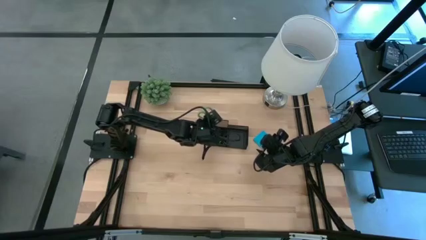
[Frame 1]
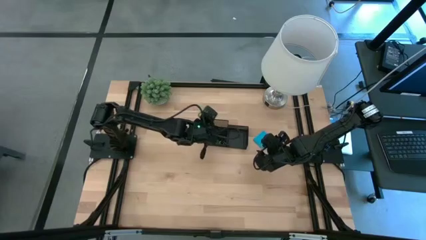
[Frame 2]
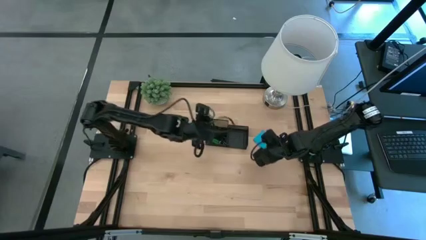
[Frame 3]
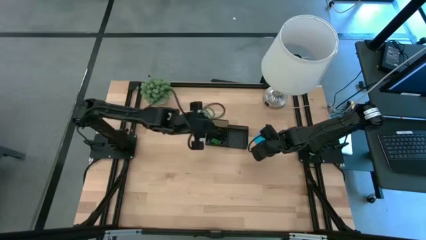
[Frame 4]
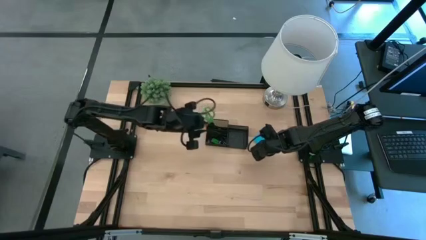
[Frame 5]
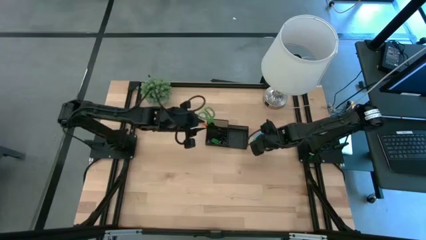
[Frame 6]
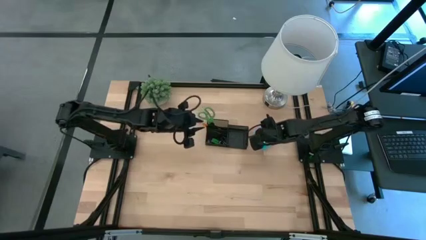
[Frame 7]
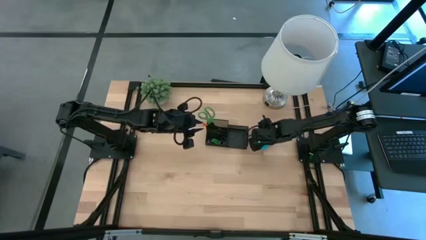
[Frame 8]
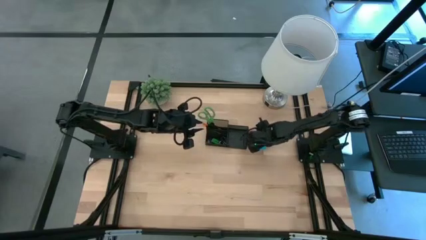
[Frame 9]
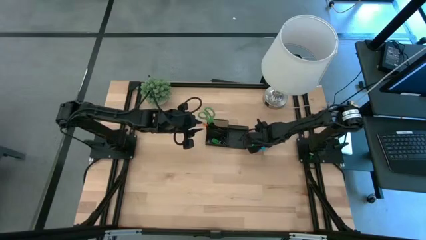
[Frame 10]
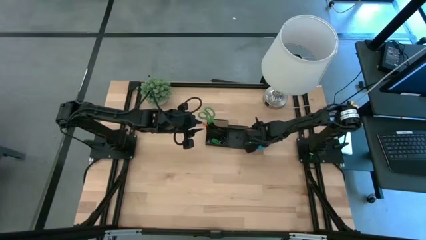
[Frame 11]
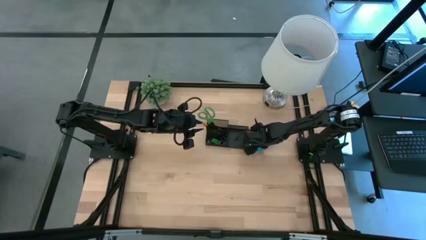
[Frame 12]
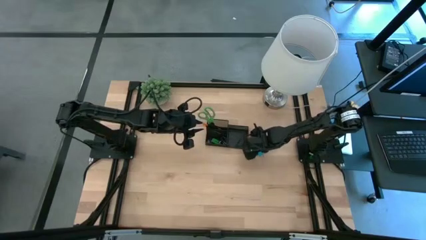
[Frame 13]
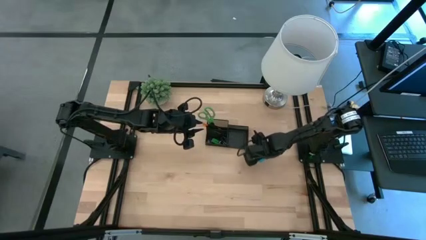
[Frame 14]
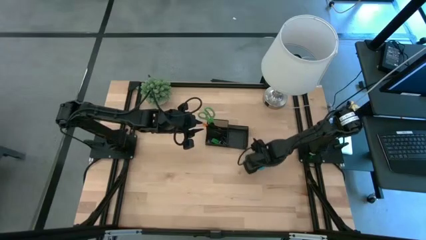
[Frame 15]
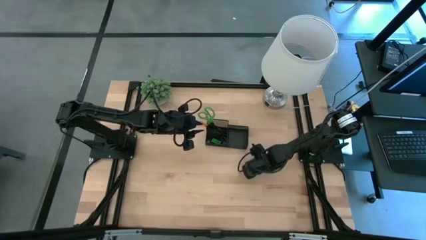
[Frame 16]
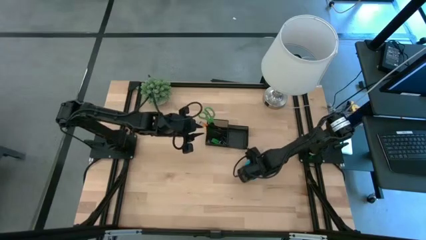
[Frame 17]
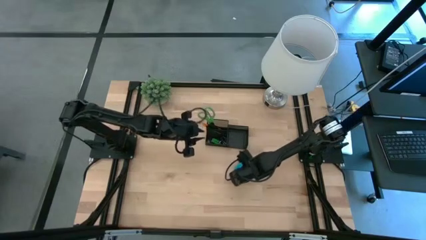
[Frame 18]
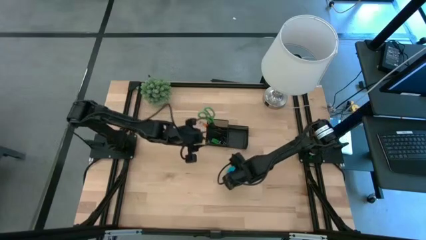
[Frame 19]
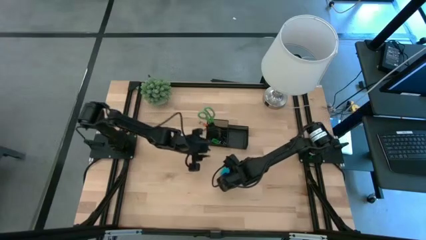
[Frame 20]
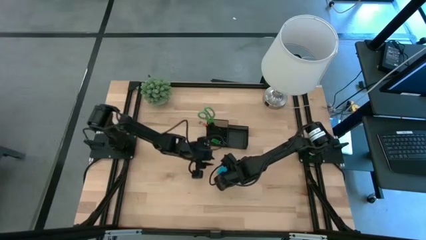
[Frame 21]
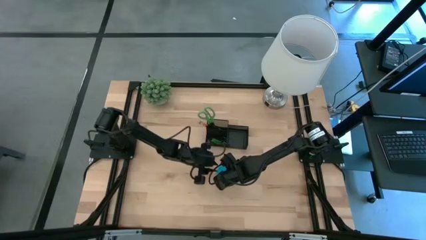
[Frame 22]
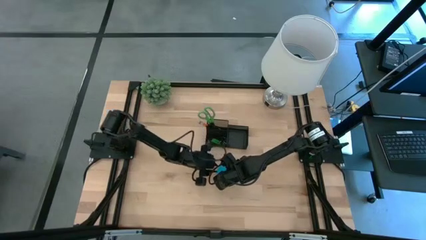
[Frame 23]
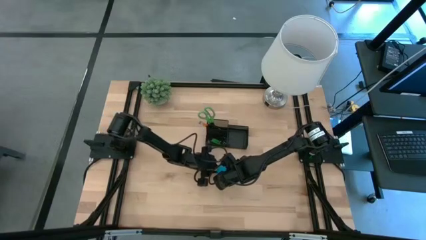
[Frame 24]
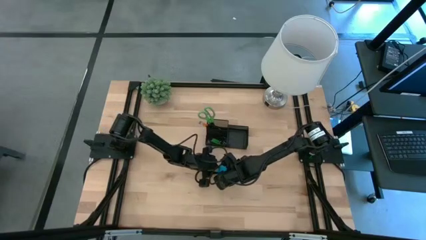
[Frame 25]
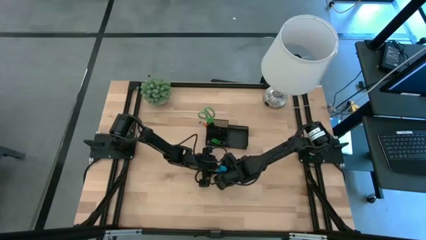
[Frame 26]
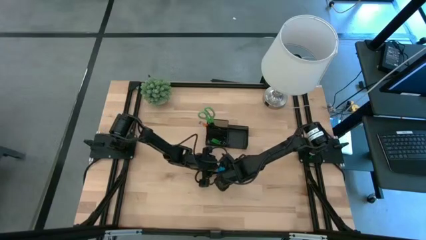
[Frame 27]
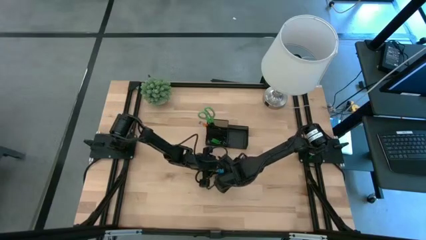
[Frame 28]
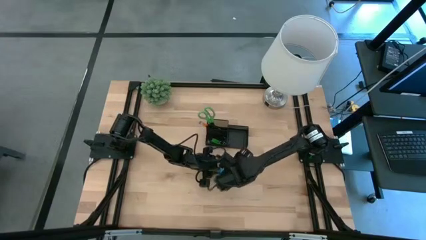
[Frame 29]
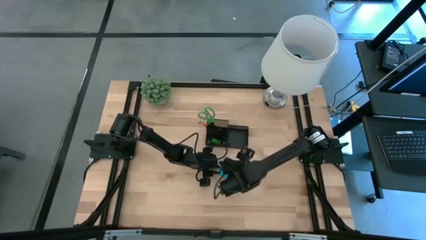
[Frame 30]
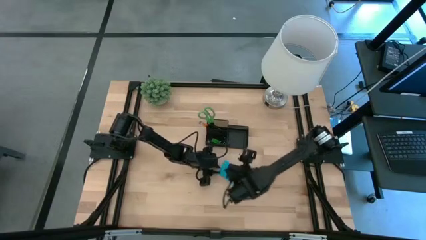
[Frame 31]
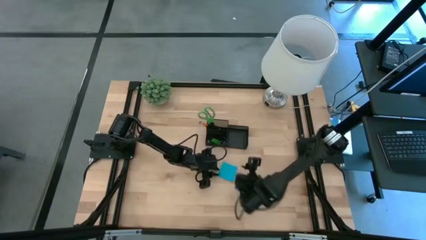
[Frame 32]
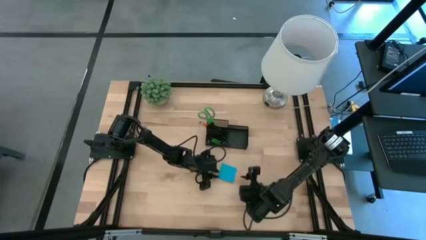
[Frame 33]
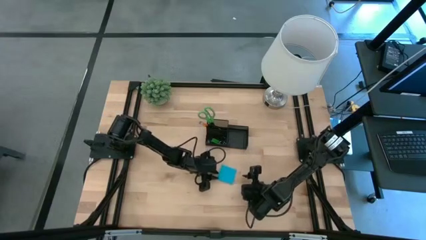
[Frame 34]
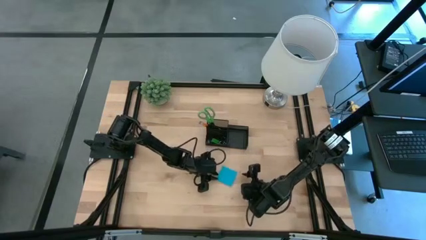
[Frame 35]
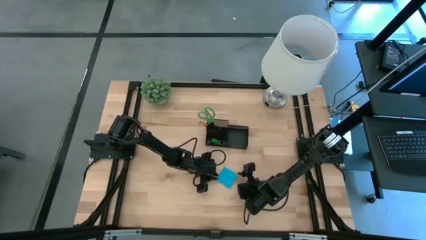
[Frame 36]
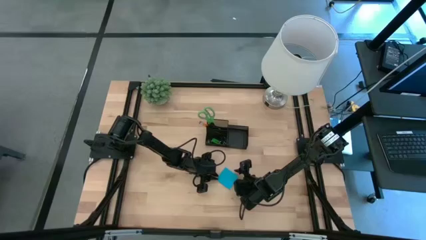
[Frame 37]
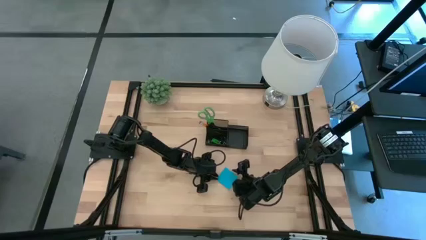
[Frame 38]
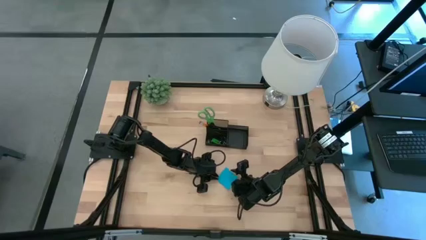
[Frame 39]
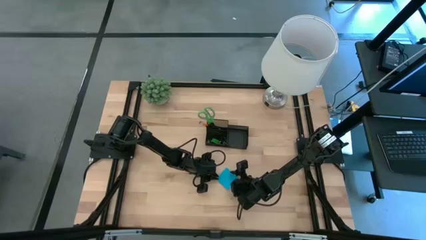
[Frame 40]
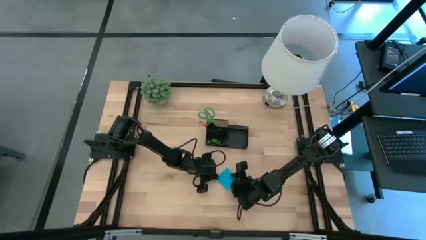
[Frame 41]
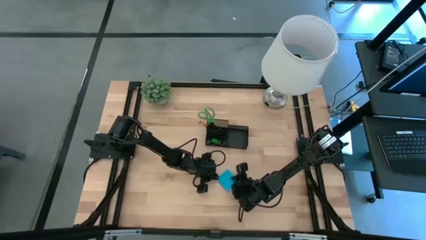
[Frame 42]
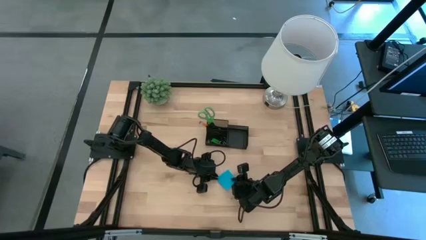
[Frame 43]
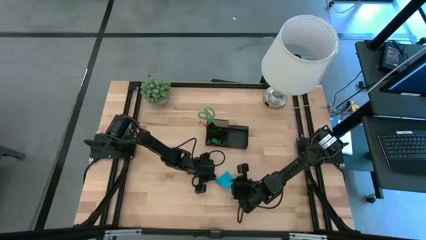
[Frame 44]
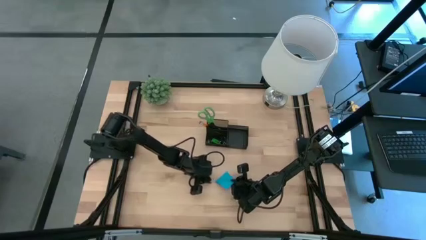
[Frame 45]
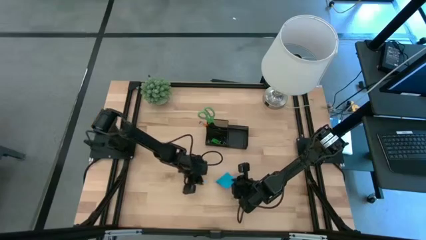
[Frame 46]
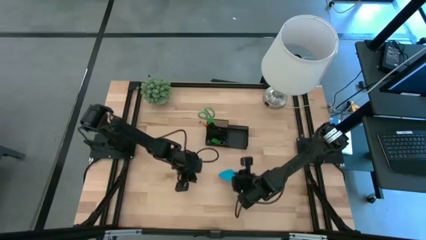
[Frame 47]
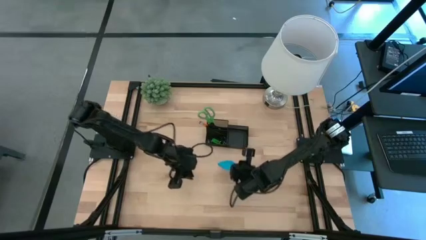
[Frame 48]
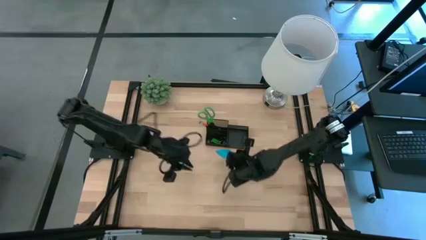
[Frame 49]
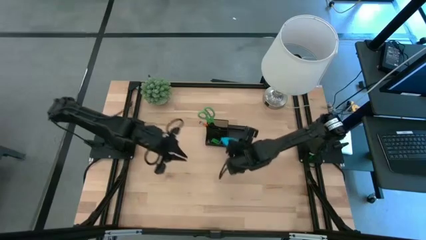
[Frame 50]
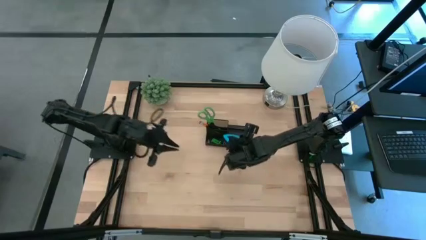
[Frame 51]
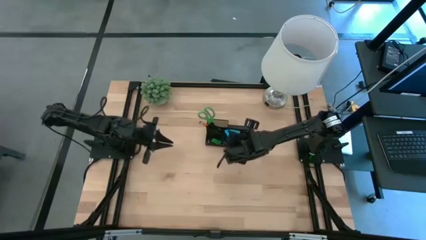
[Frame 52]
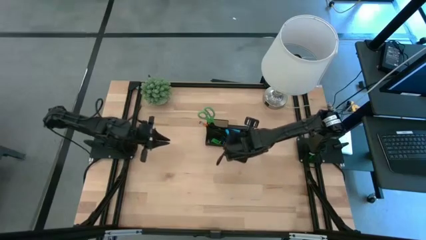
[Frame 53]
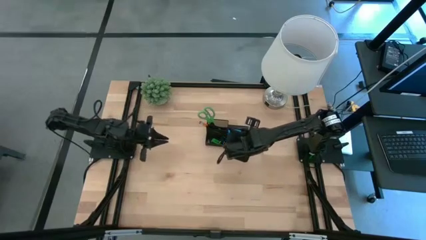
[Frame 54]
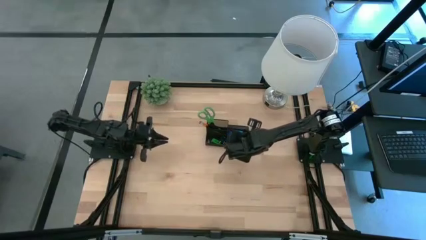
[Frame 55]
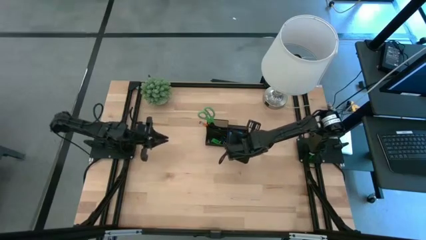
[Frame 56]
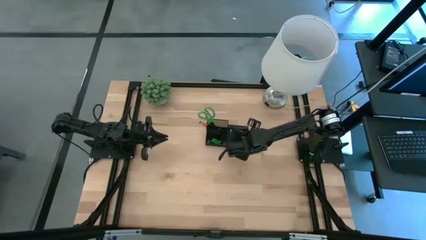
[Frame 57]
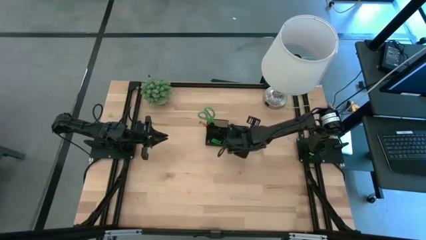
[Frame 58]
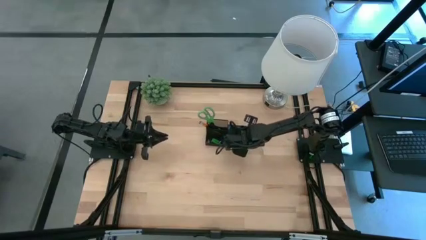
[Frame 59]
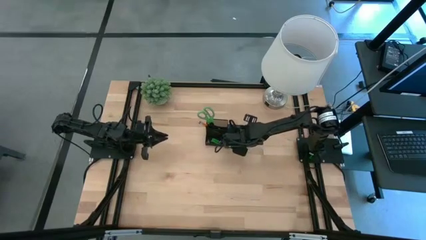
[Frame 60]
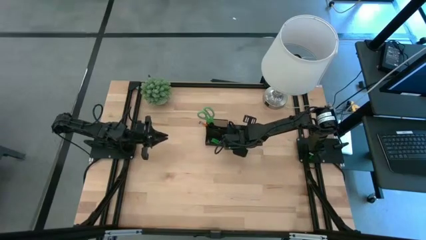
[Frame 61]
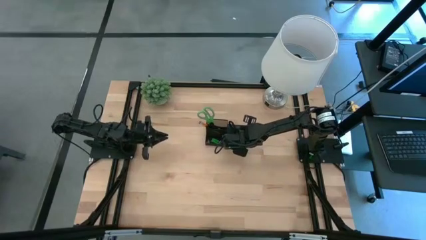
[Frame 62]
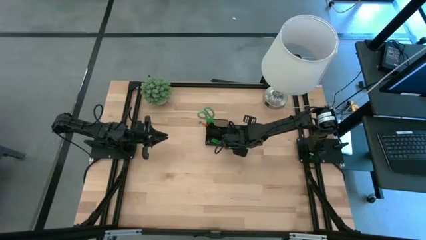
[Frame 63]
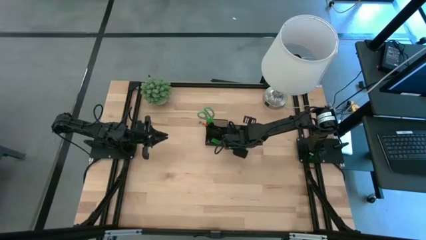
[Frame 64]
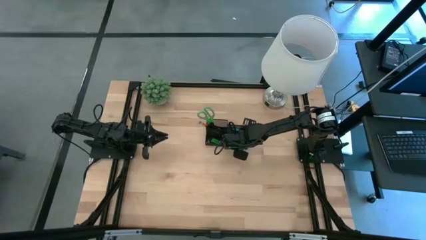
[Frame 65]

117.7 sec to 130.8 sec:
Task: Pick and place office supplies into organizer
Put the blue sticky notes into the black organizer

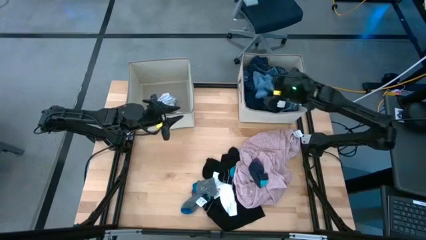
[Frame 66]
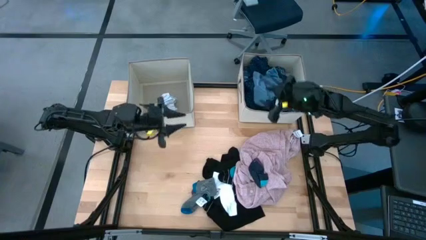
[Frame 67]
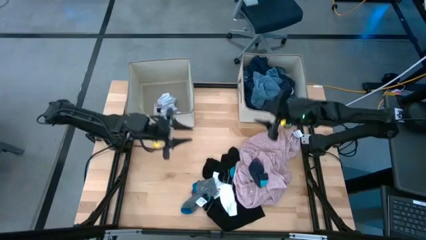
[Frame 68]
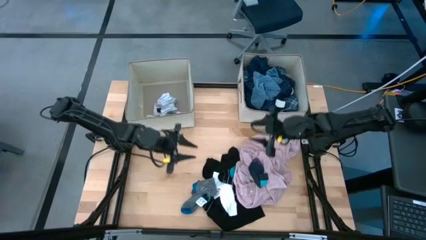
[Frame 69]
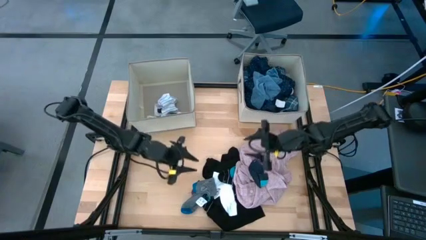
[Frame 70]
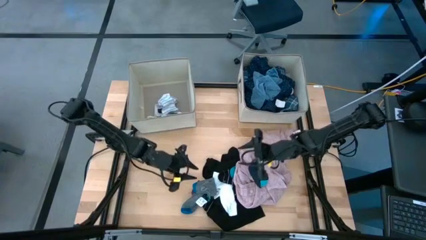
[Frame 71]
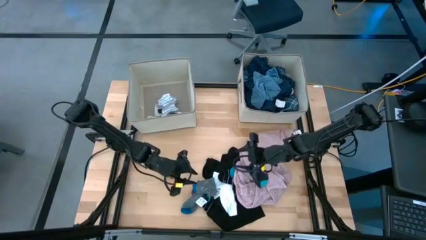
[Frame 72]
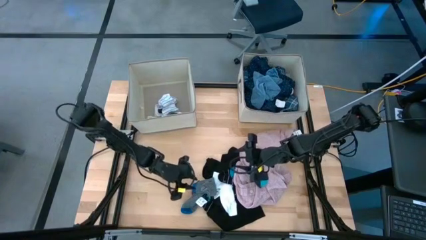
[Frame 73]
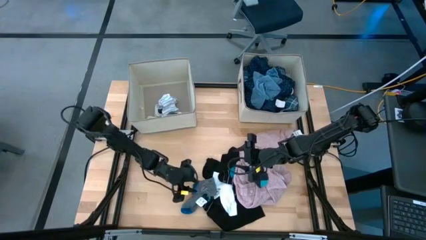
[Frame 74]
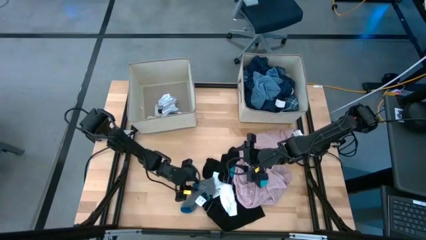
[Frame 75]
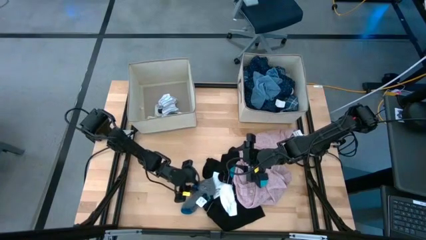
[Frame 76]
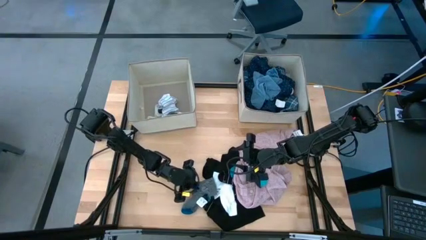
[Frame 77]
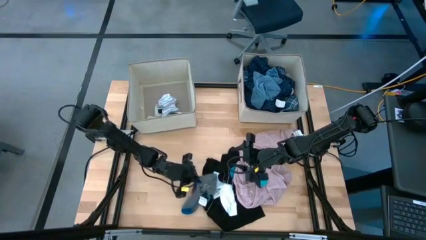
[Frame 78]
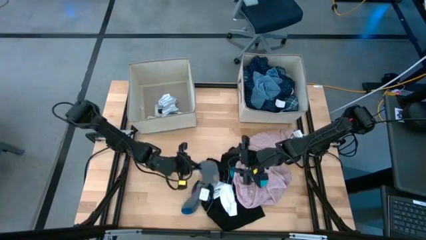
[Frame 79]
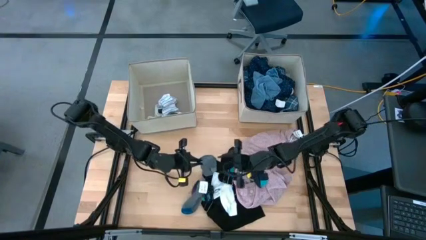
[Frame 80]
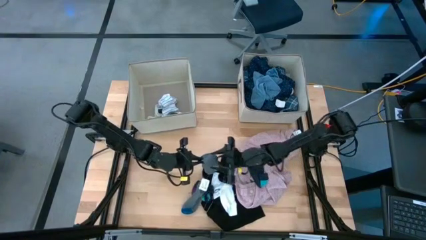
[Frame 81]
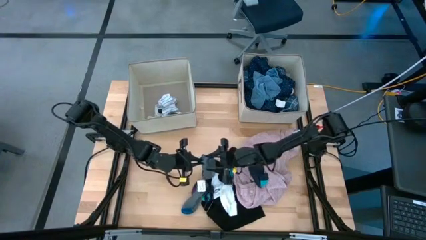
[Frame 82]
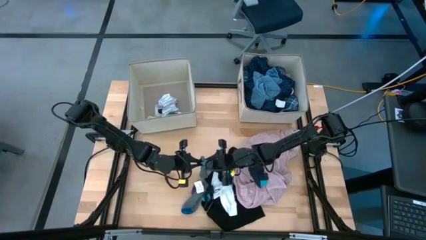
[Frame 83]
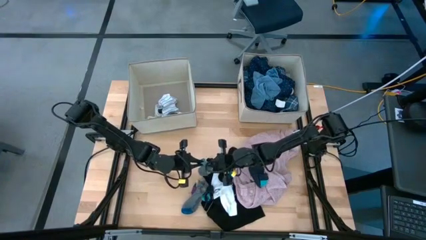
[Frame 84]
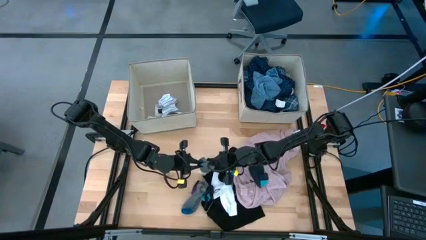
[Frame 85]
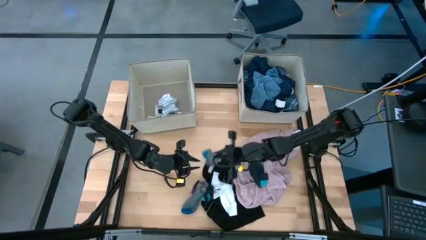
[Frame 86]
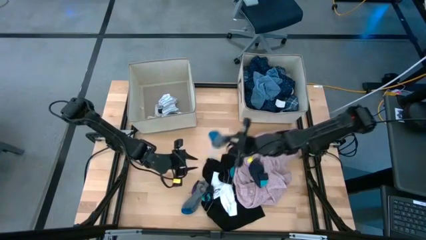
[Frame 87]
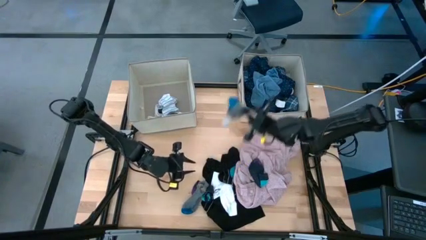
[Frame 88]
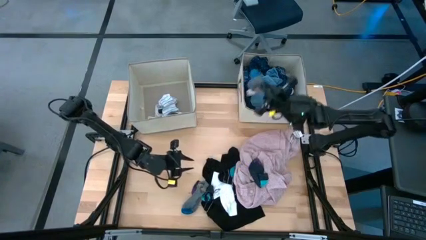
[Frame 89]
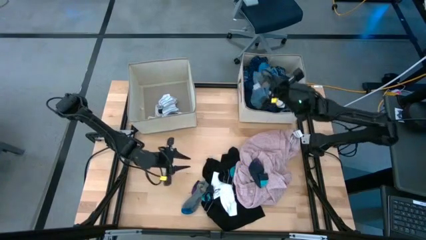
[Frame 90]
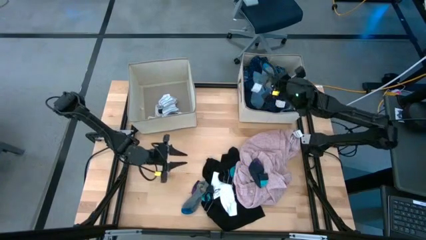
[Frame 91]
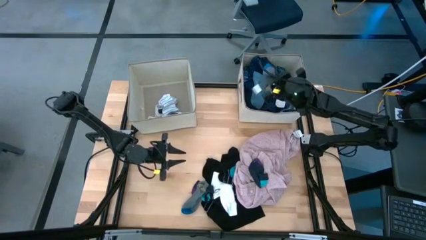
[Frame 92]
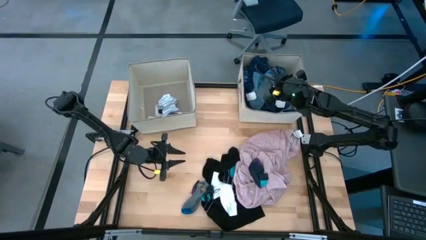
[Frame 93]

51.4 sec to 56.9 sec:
Task: Sort clothes
Put the gray sock into the right laundry bin
